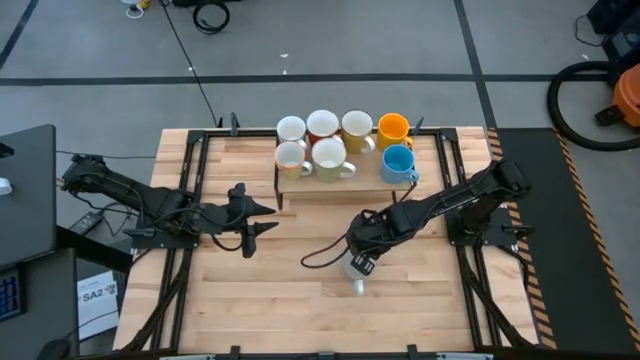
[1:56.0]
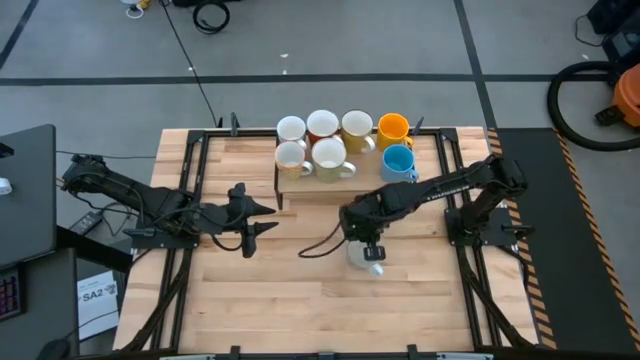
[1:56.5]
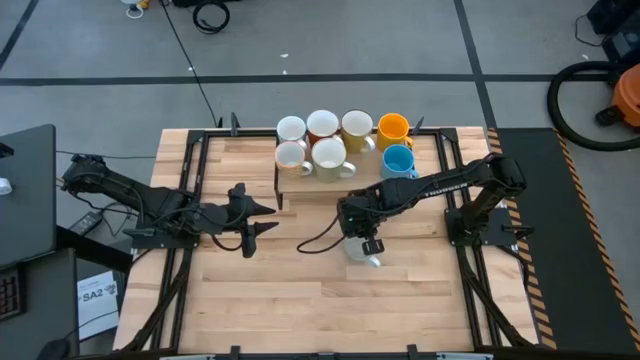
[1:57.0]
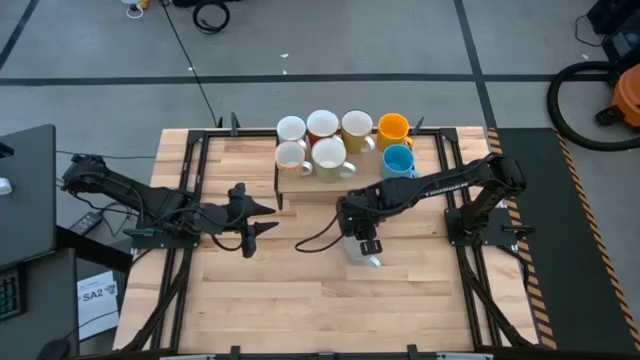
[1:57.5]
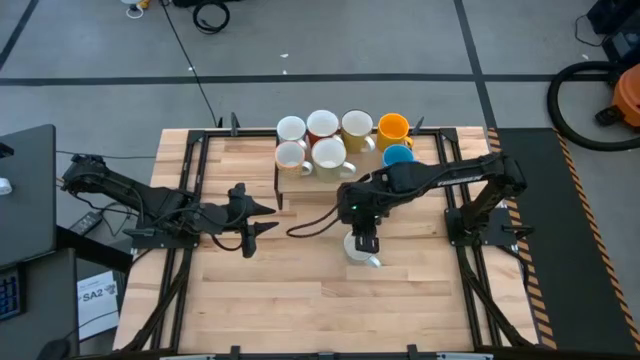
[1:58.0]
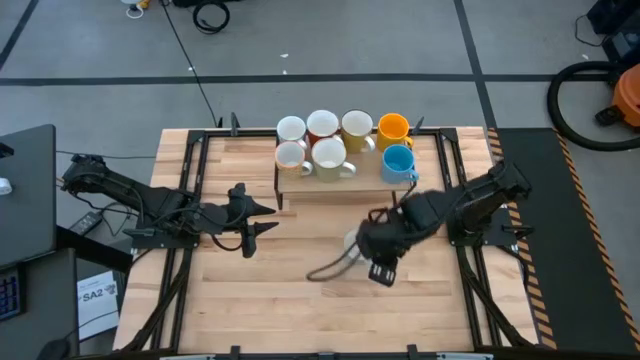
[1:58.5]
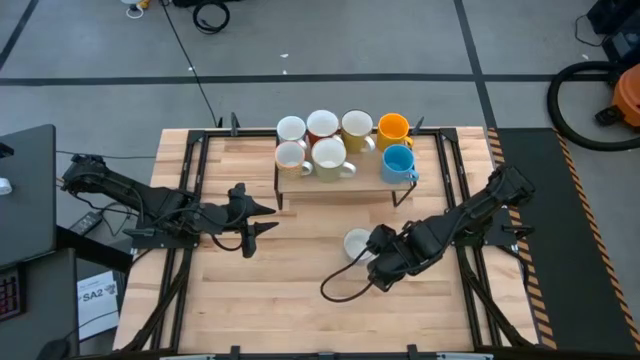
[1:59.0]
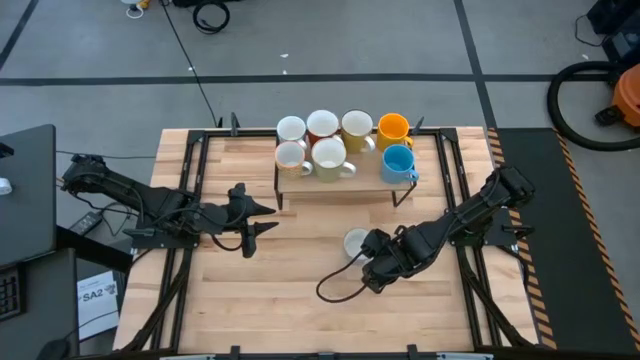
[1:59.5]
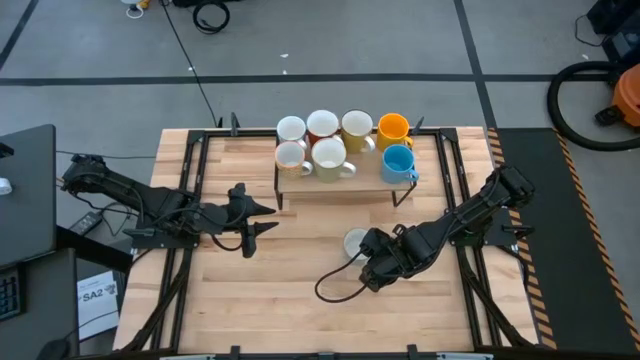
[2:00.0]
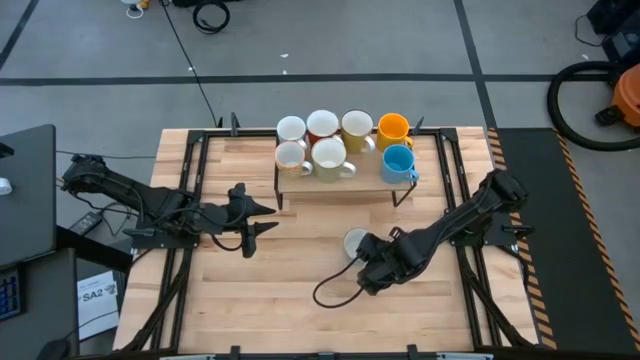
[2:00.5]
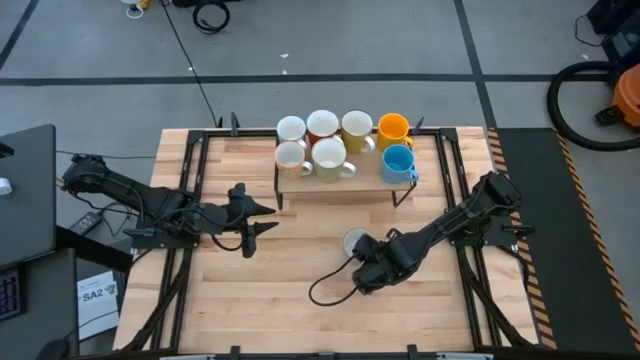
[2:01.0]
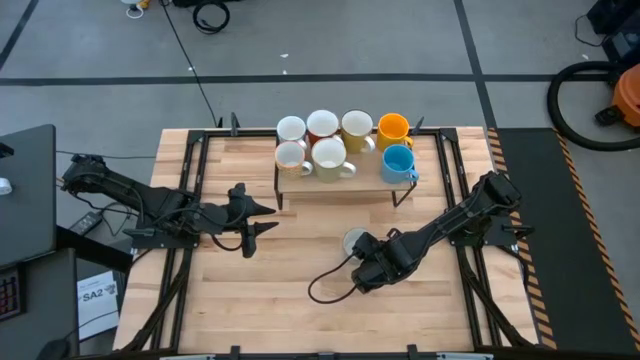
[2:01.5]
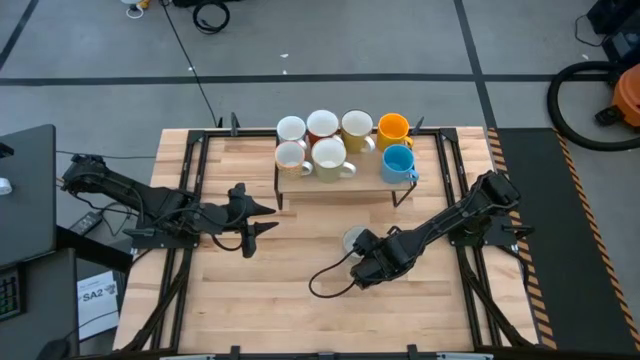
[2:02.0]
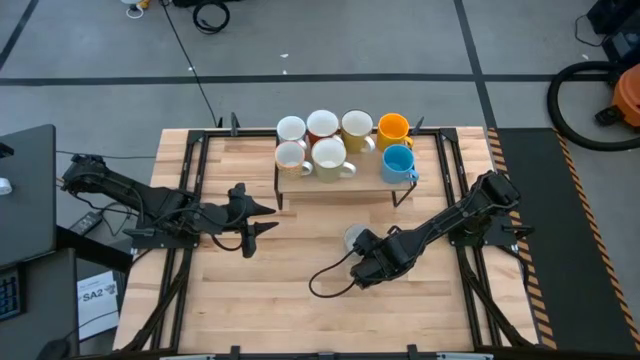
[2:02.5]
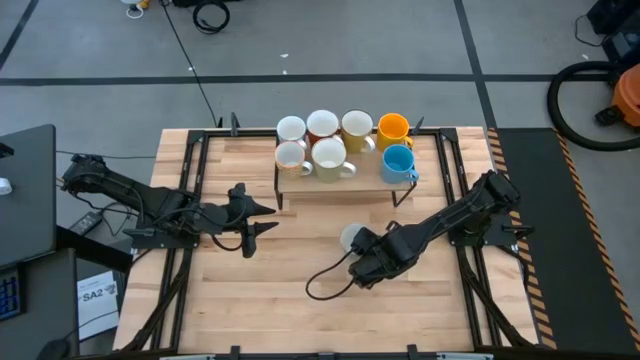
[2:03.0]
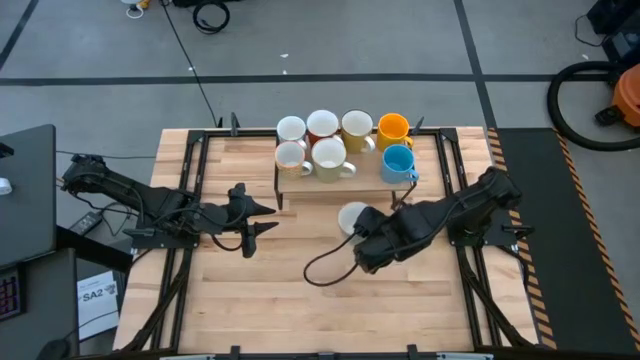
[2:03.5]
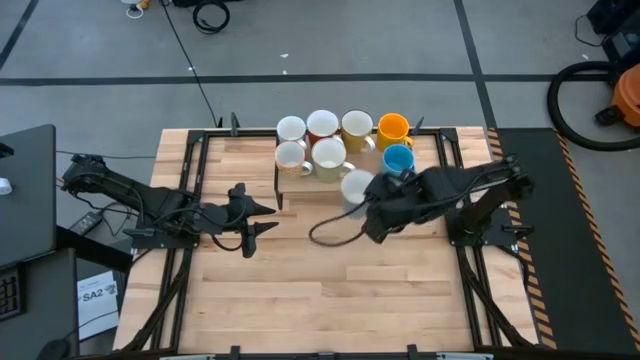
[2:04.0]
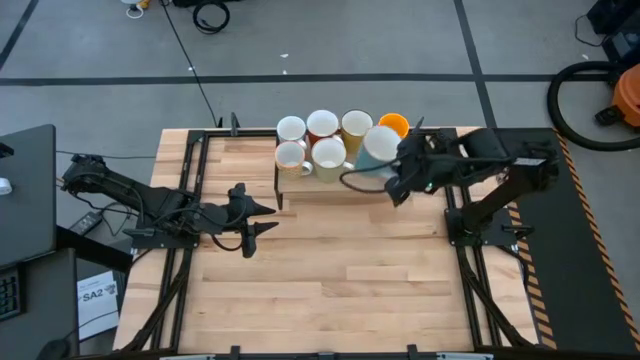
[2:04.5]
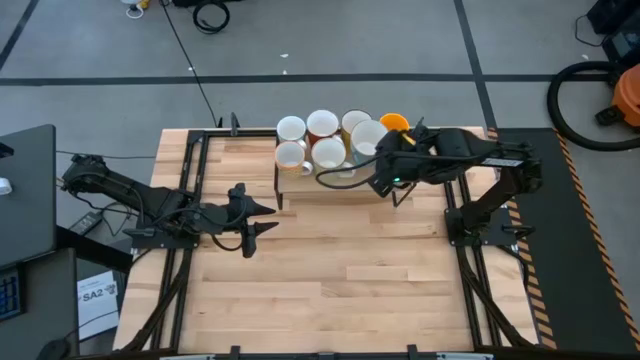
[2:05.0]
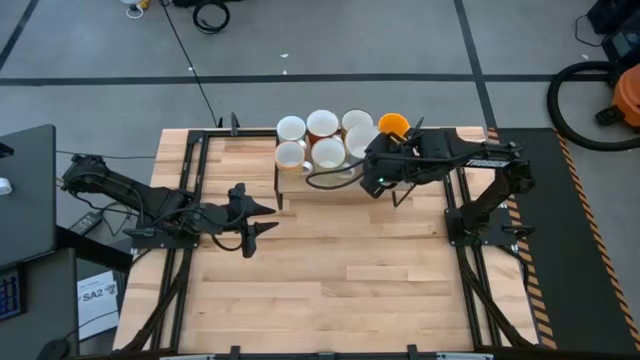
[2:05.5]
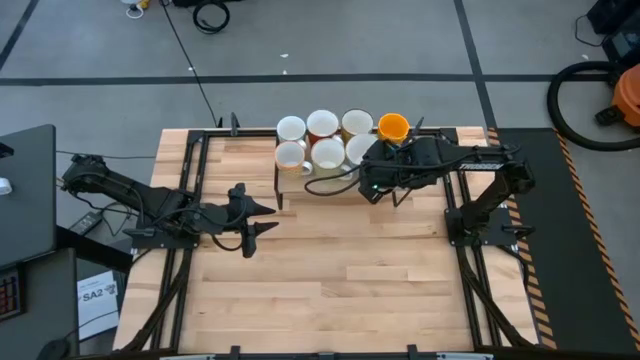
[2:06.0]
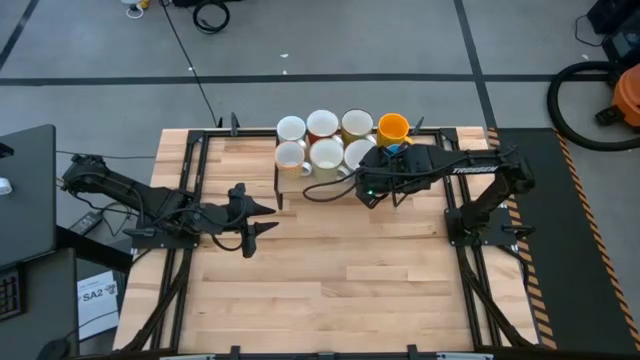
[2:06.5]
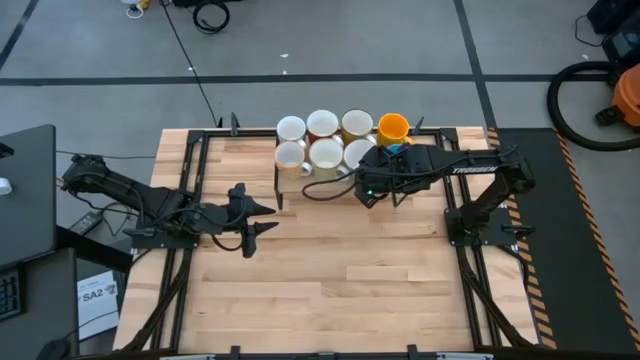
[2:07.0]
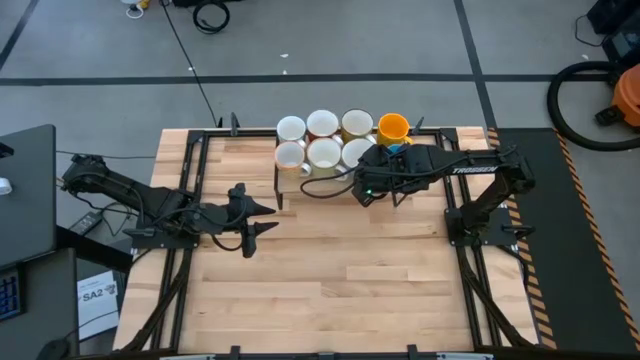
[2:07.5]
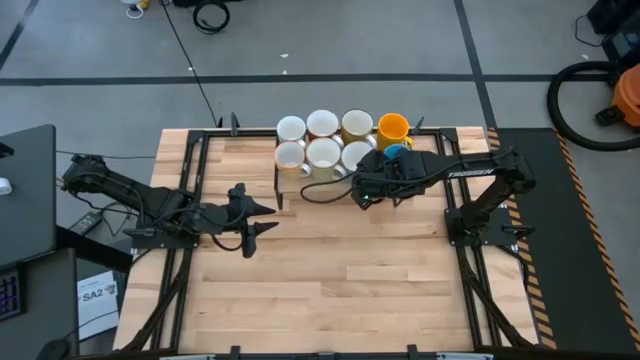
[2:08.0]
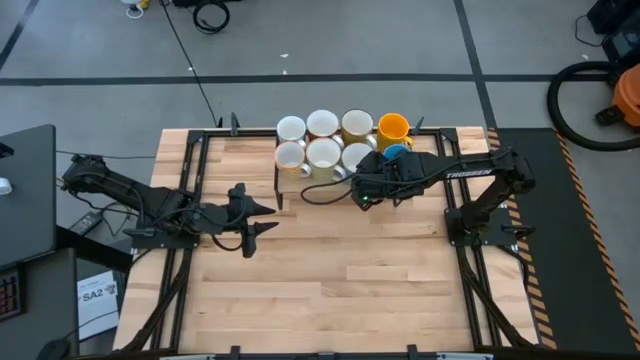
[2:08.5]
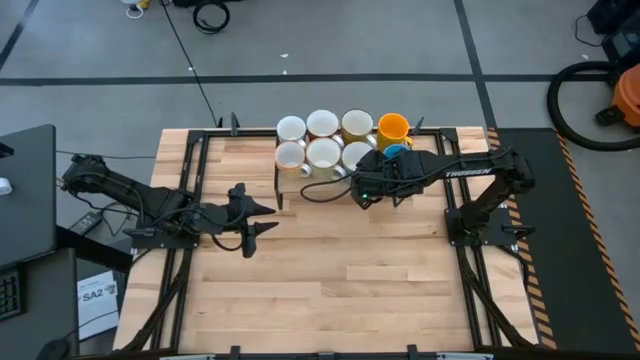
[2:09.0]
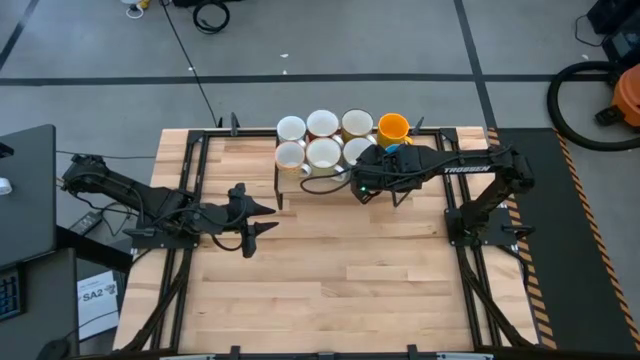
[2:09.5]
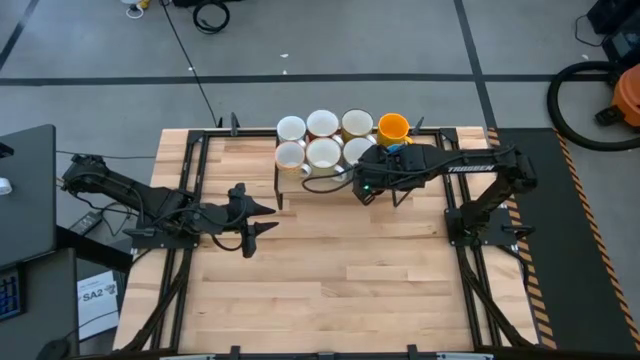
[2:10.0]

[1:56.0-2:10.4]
Task: Place coffee mugs
Put the blue mug on the shelf

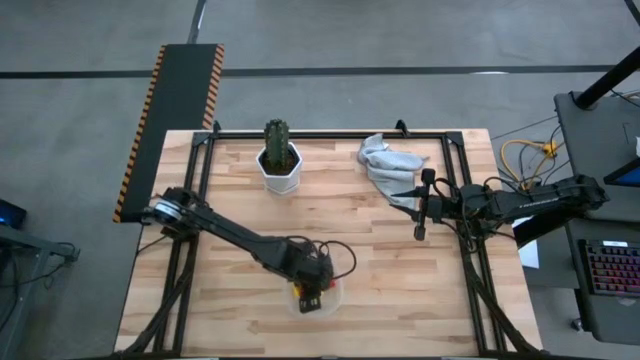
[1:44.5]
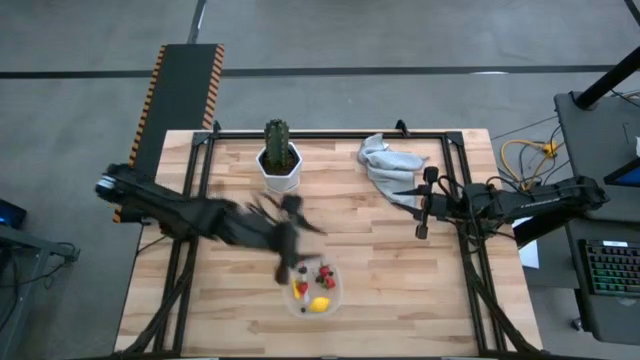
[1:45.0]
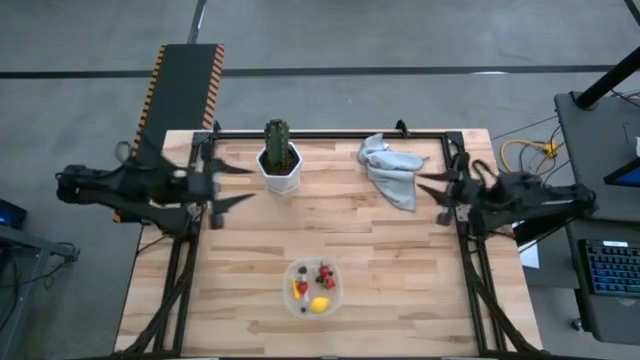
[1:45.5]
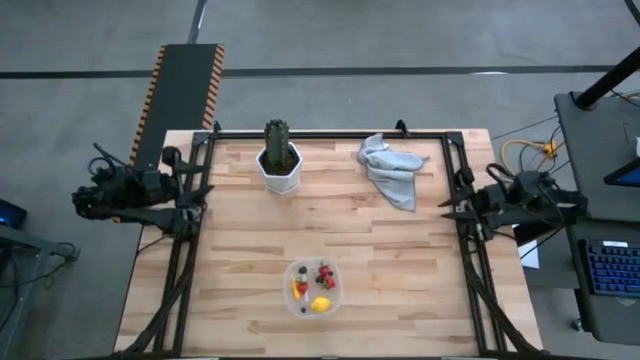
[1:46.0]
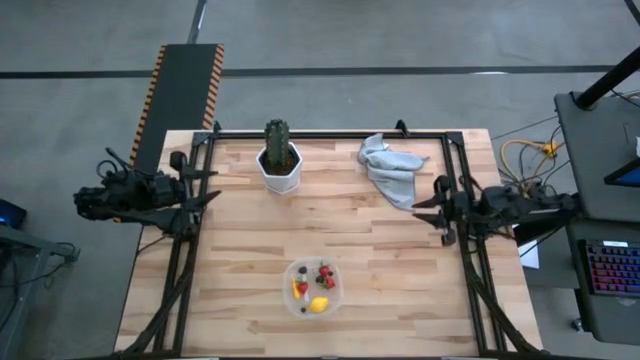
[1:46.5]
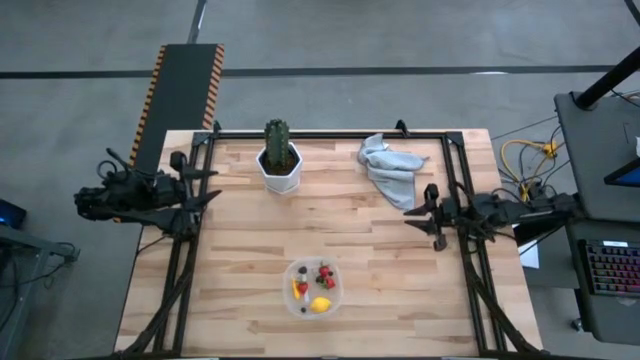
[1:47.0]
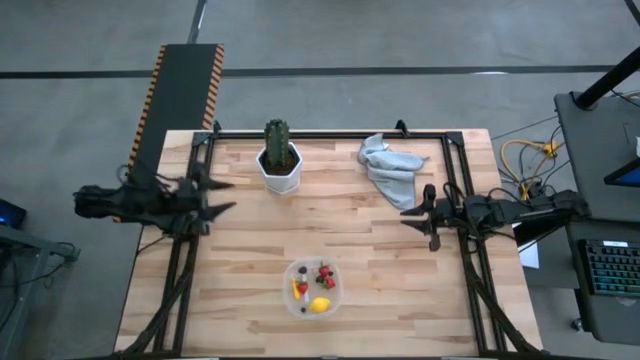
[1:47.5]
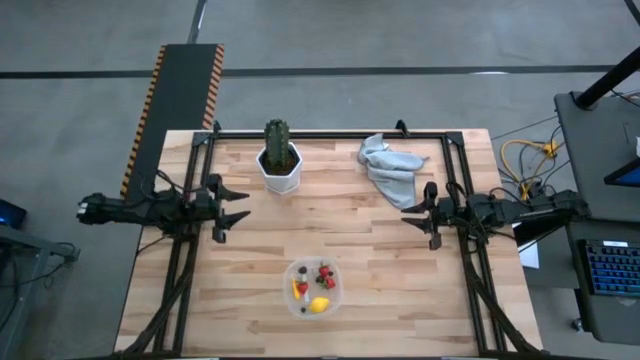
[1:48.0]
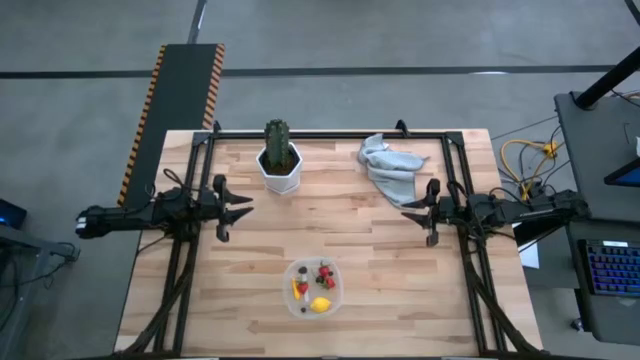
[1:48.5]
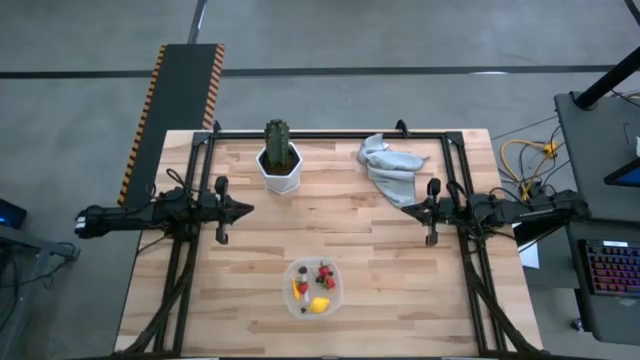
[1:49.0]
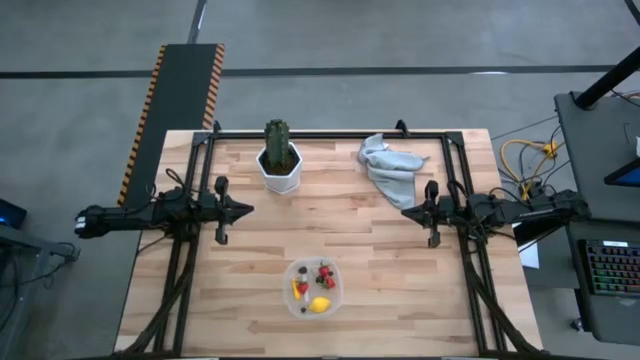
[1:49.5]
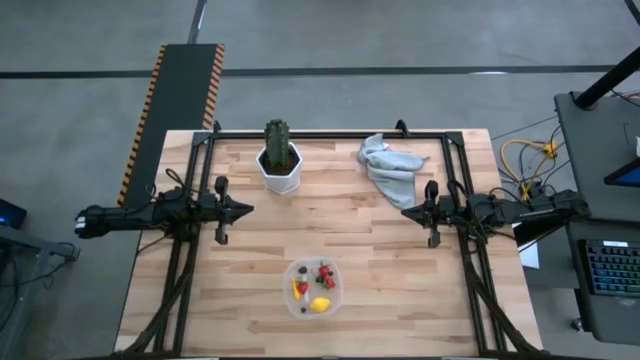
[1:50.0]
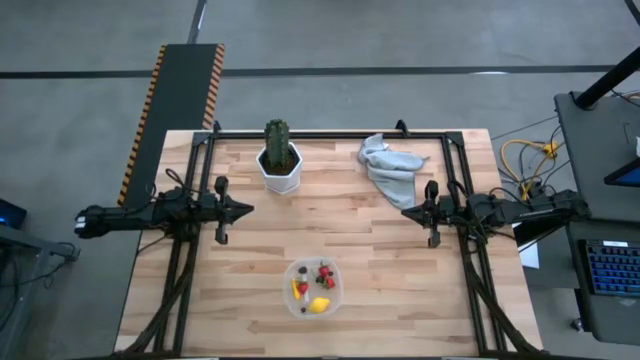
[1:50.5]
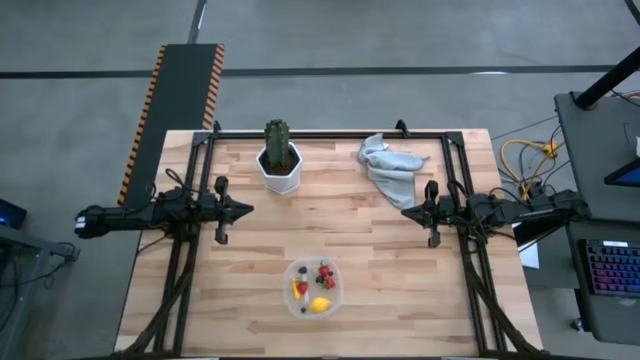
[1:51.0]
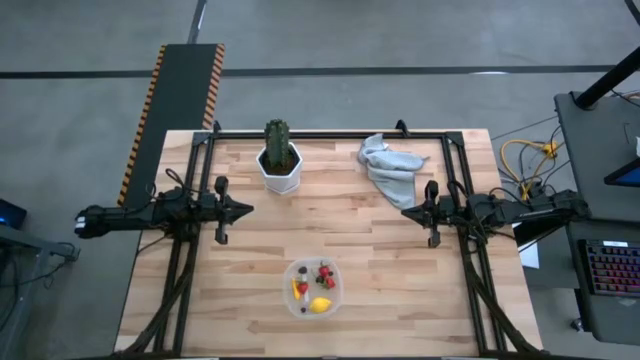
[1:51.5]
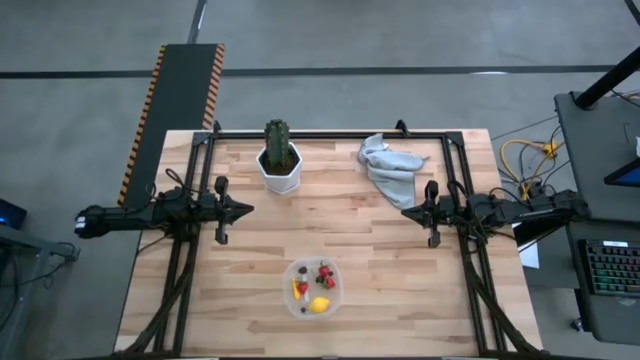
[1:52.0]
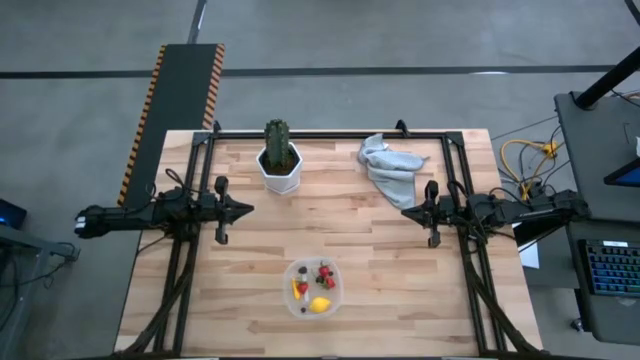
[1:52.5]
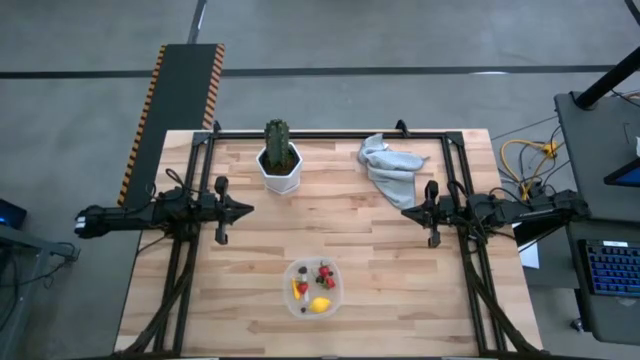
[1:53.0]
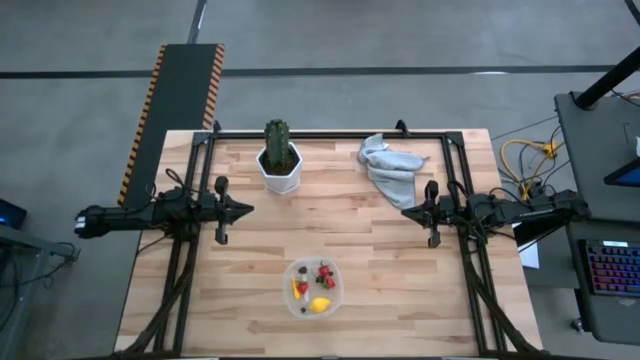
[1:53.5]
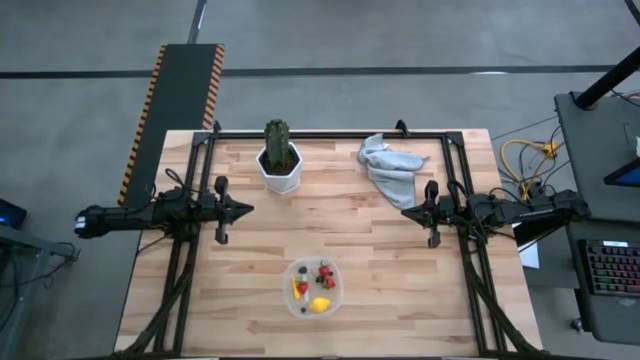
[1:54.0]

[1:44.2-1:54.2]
Task: Pick and placing Produce into tupperware
Return to Home Position
